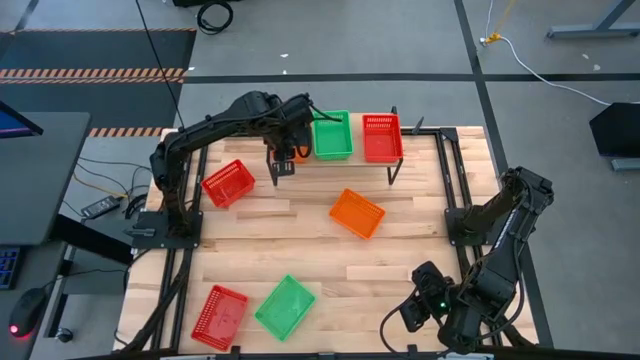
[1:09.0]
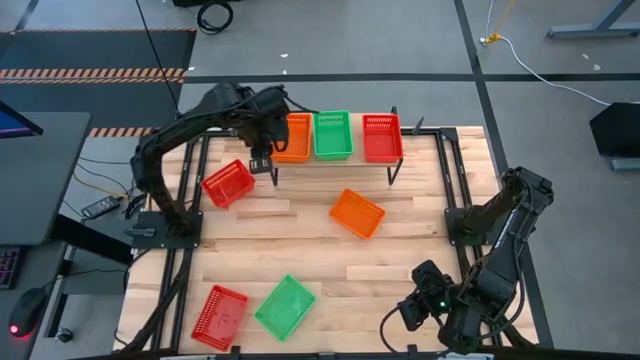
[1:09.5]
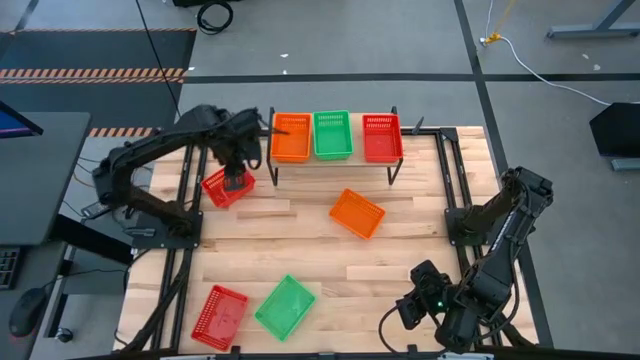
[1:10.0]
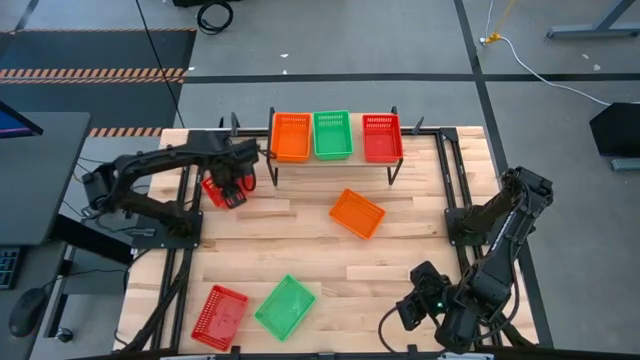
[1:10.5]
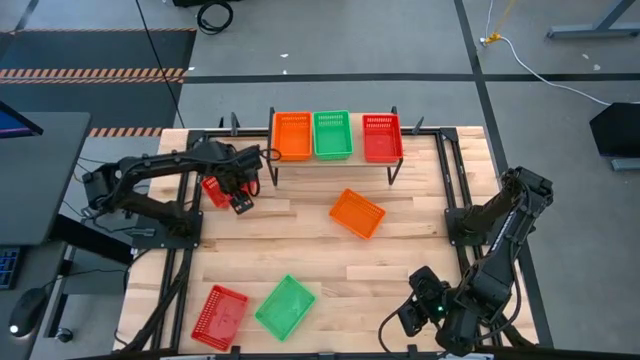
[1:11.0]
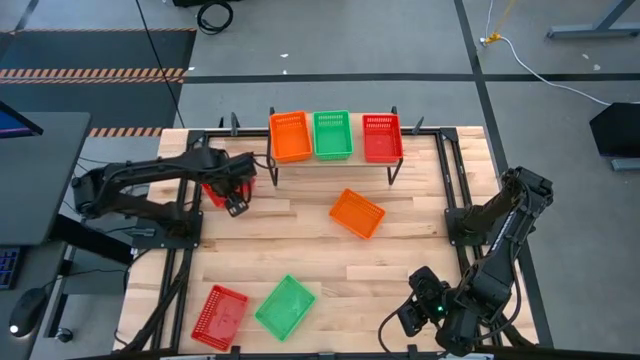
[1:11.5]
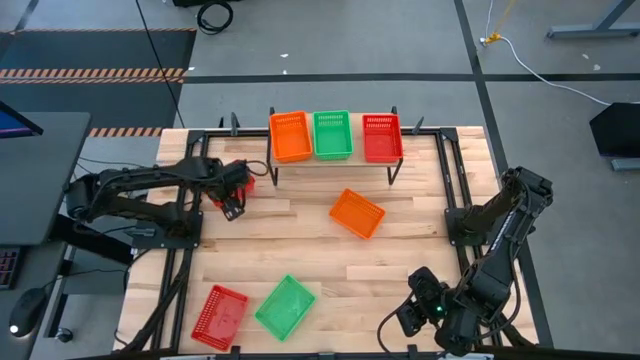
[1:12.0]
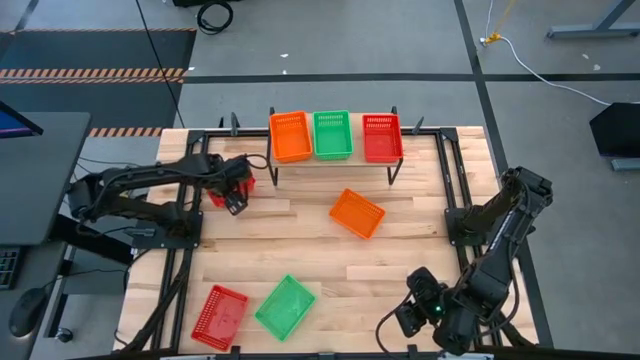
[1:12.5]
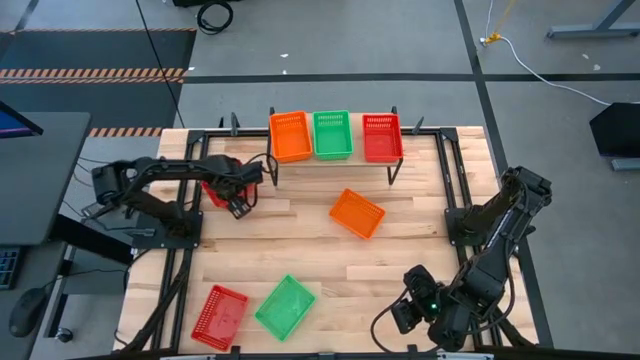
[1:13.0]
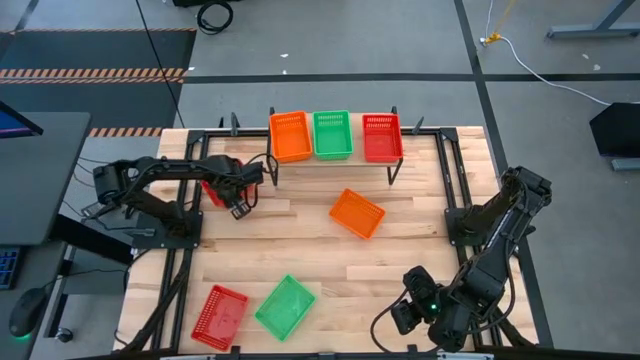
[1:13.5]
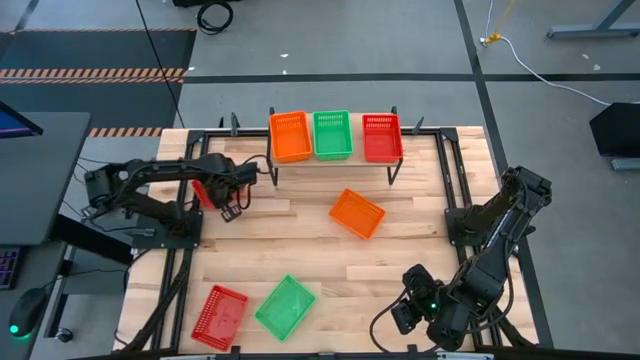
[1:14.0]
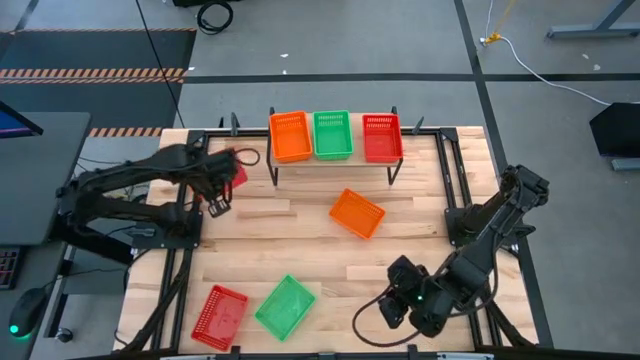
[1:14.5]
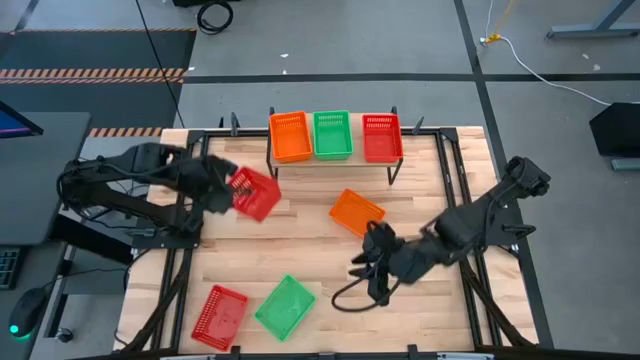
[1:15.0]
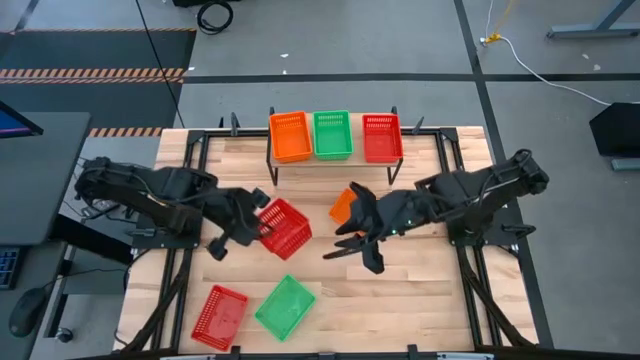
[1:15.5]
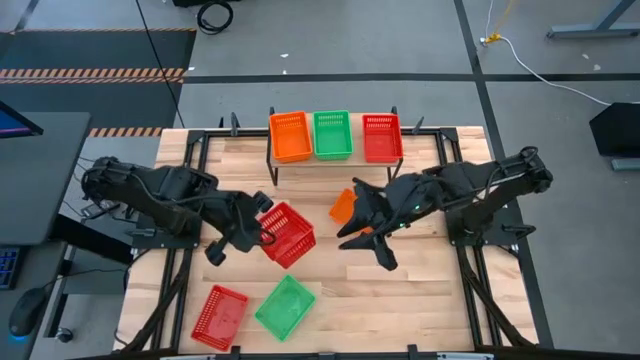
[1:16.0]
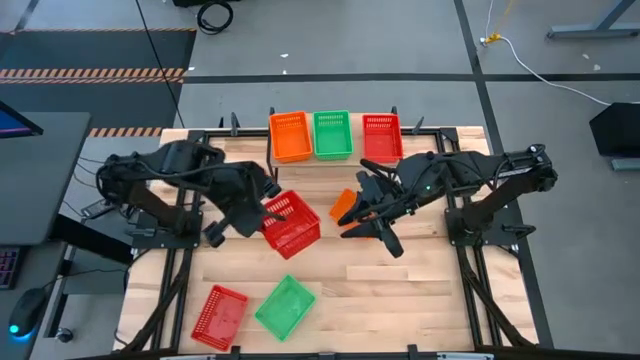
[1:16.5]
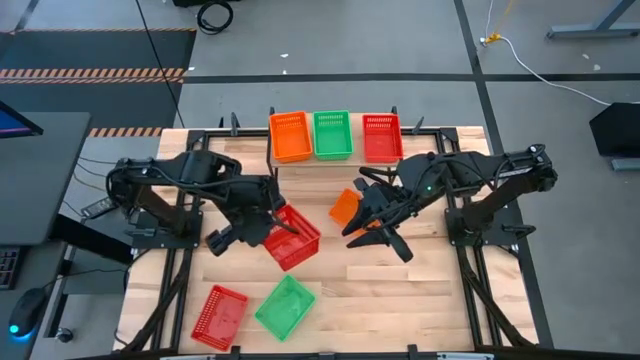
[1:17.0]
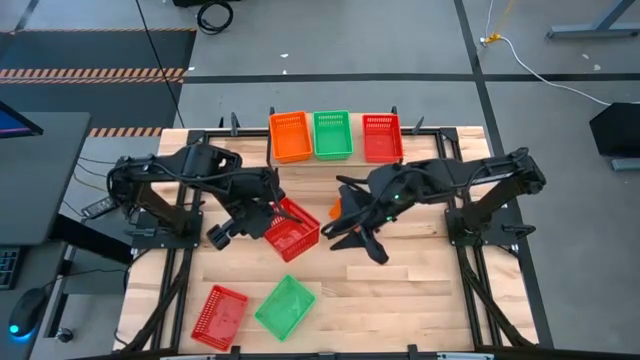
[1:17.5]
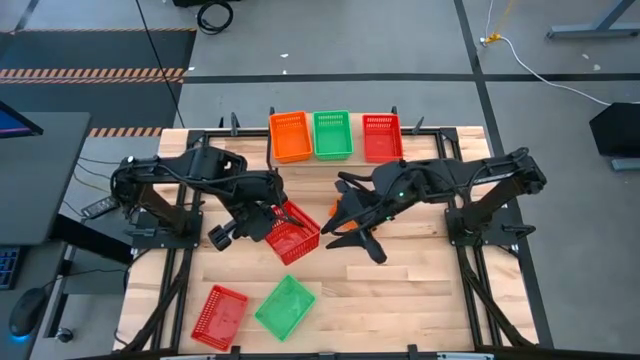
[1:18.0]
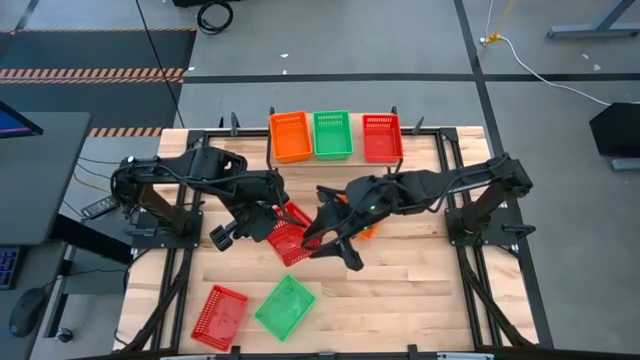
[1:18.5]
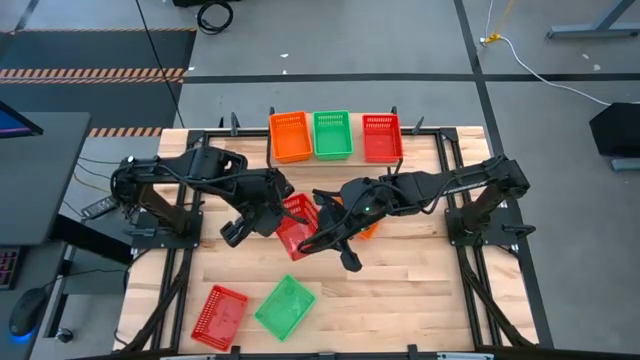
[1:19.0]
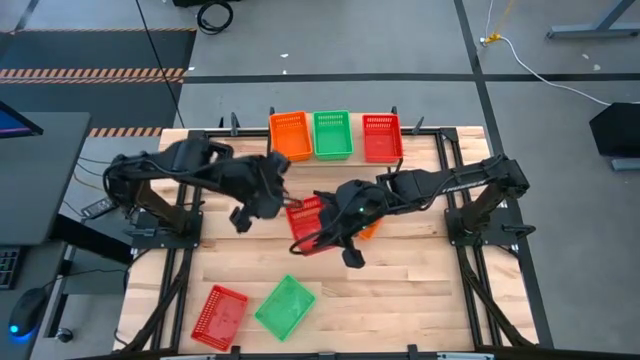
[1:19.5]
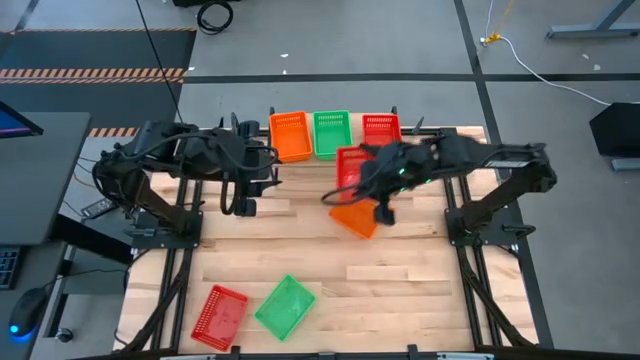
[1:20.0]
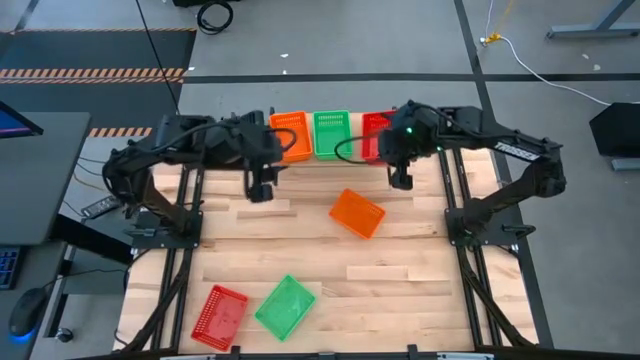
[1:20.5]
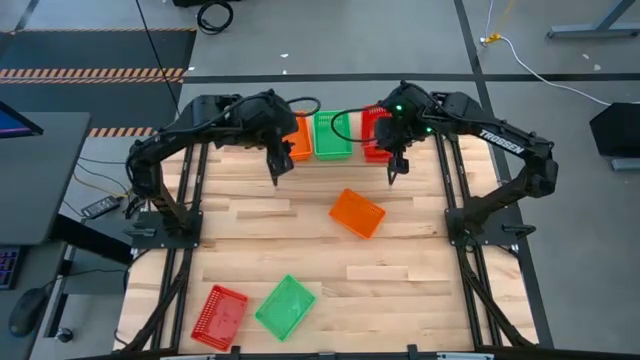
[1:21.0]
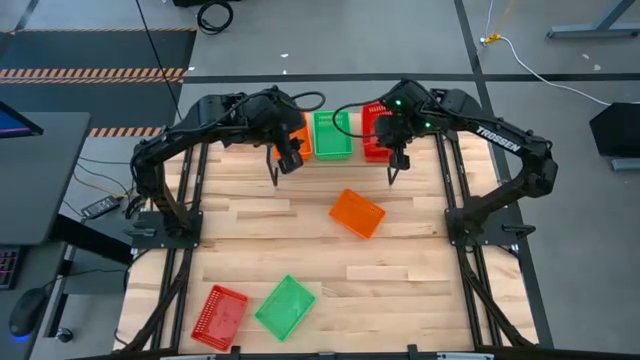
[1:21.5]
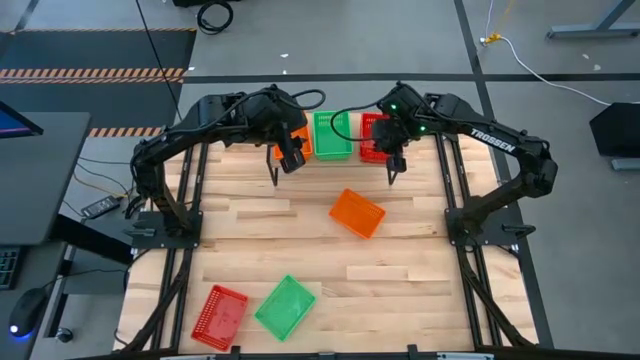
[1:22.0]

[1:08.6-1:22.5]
Task: Stack baskets on shelf by color
Stack the top red bin on the red bin on the shelf

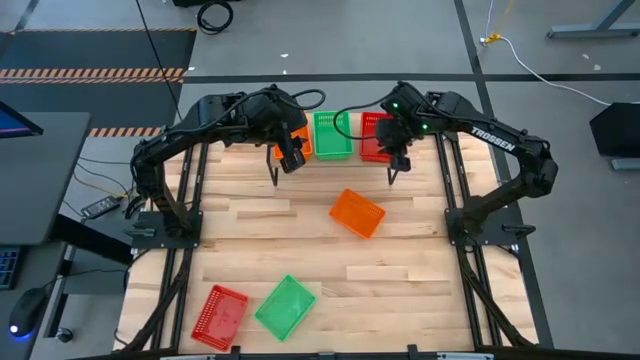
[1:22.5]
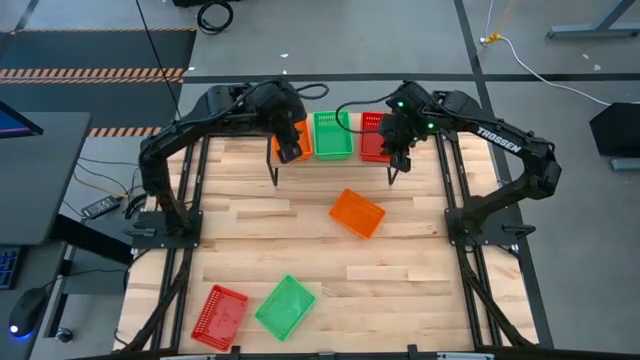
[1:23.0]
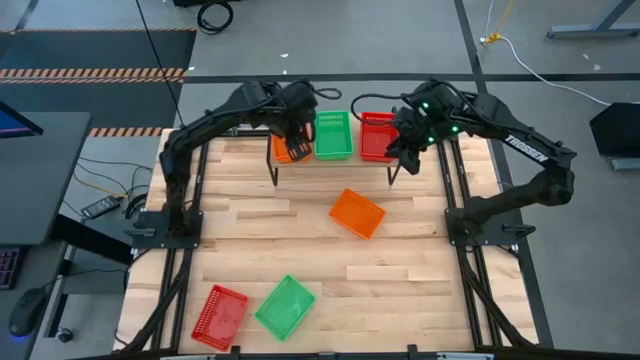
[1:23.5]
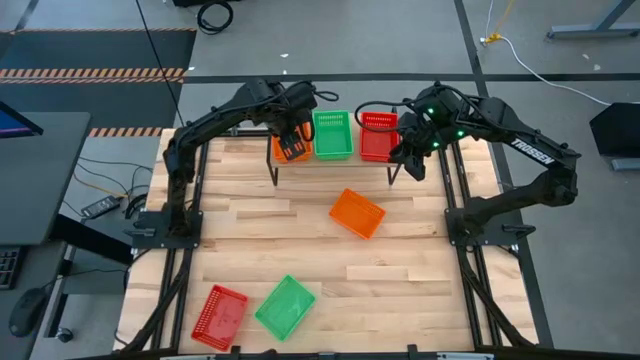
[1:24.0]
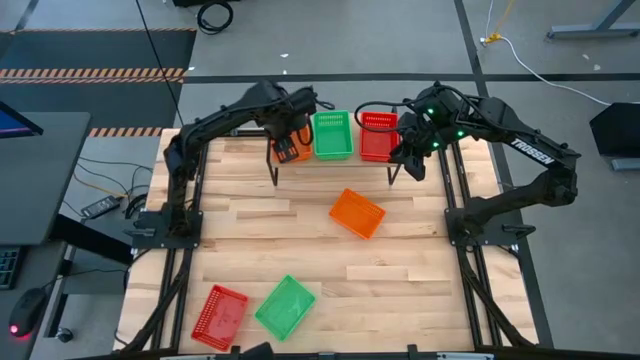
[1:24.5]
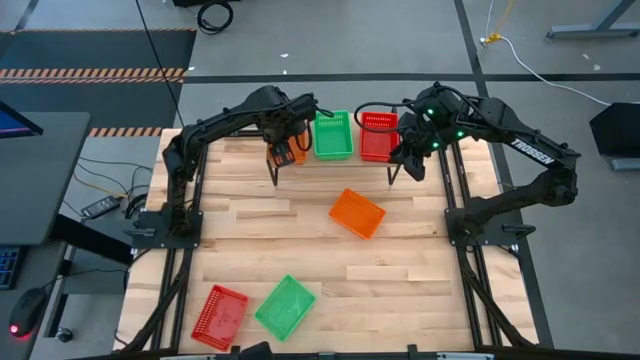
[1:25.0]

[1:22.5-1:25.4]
Adjust the orange bin on the shelf

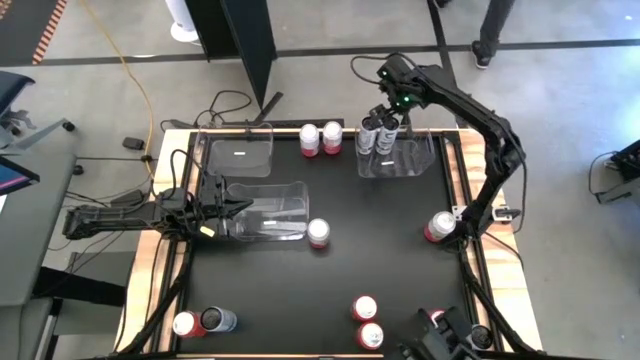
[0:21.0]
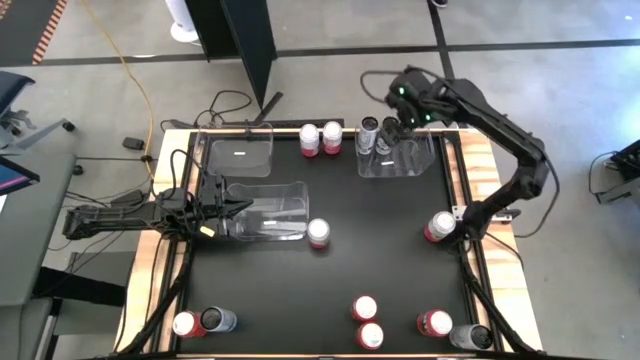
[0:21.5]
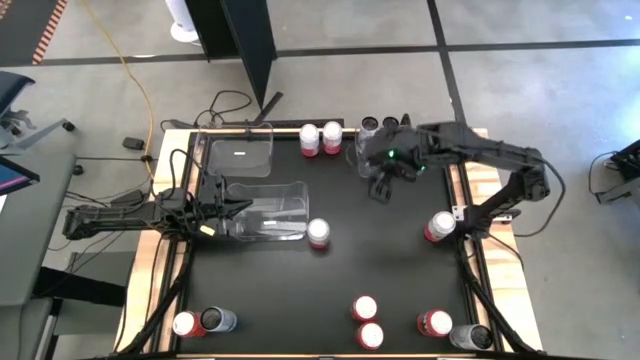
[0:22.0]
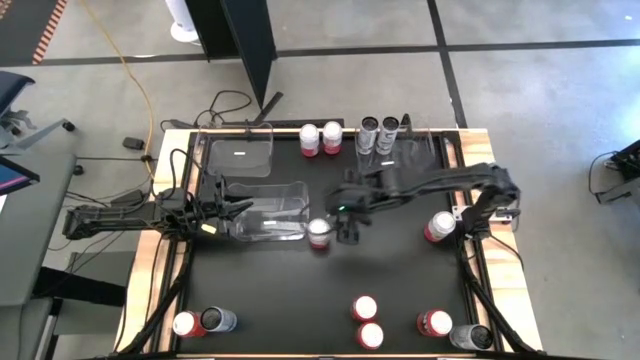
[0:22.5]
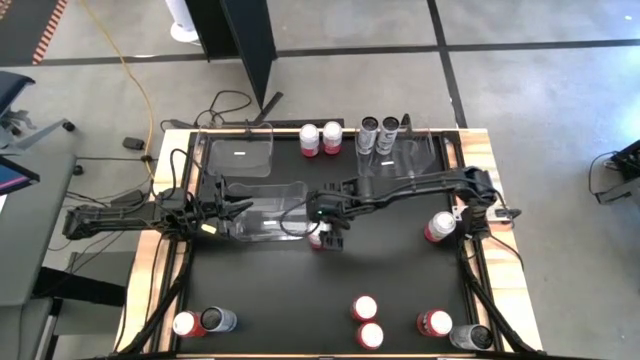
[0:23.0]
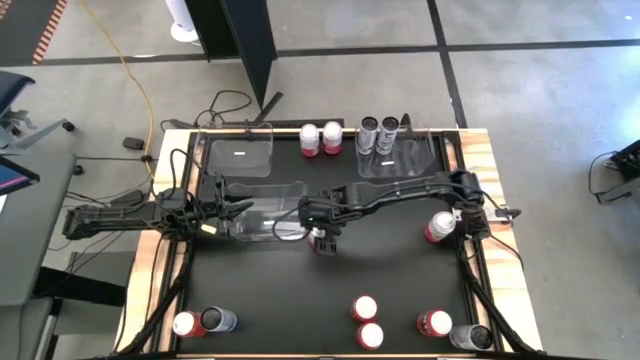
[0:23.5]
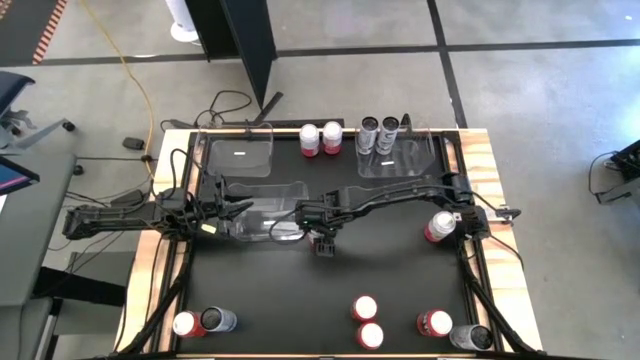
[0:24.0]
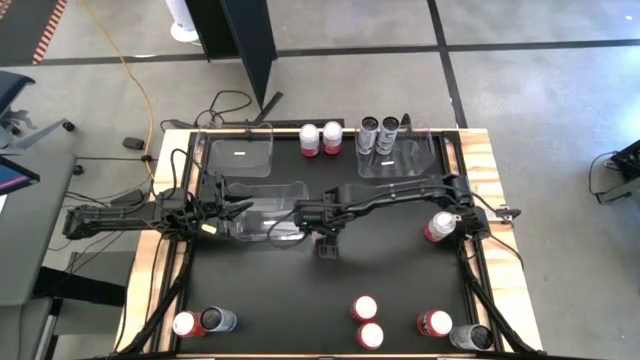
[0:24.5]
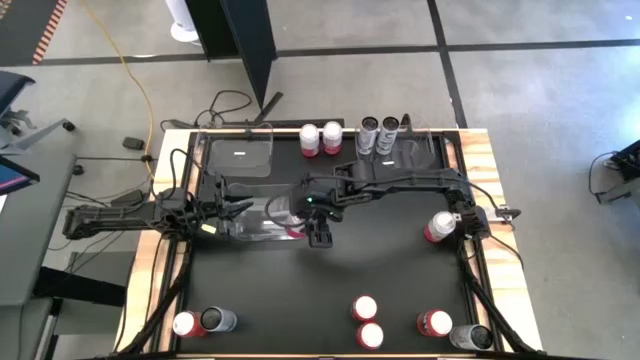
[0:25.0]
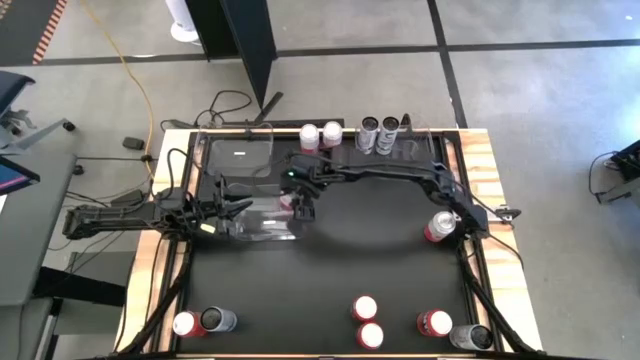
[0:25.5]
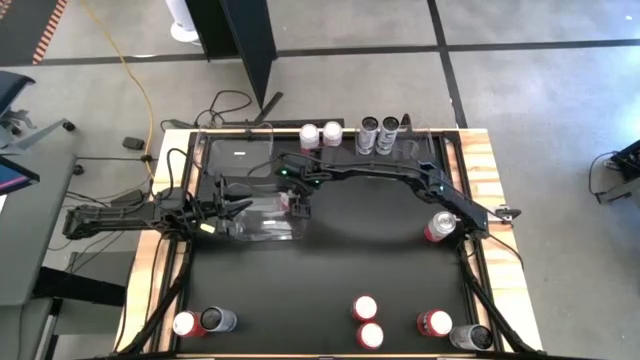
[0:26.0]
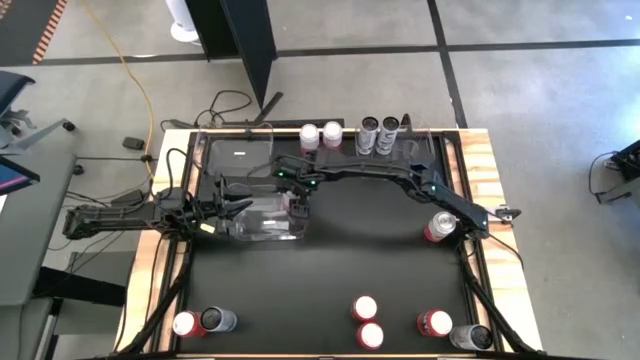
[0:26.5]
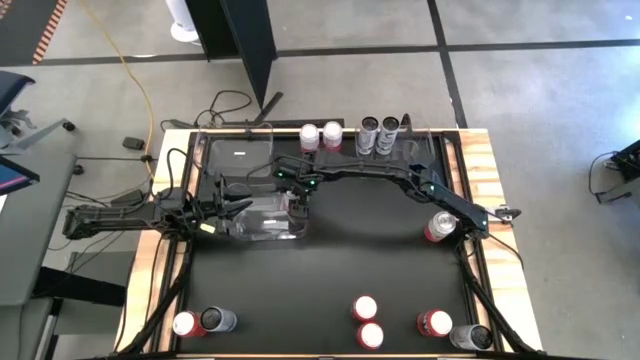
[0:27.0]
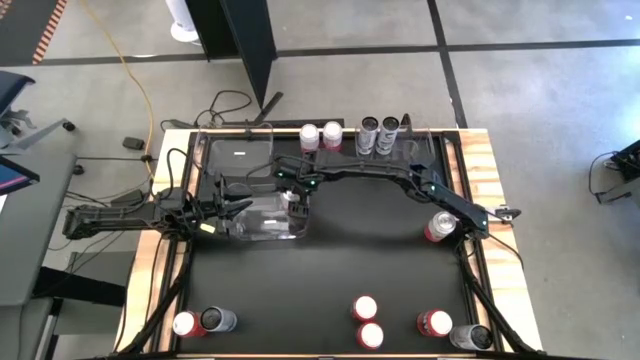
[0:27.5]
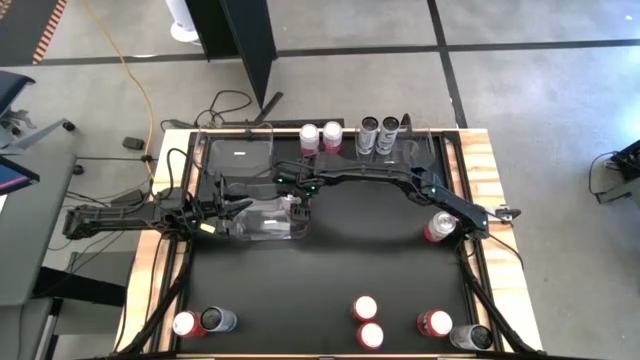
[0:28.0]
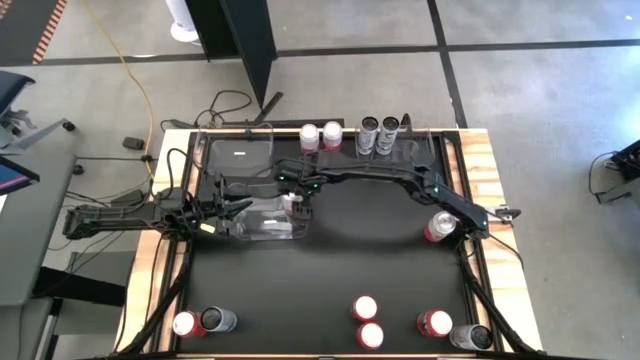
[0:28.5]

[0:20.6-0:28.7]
Task: Sort soda cans
Put the bottom left pink-white soda can into the bottom transparent bin
